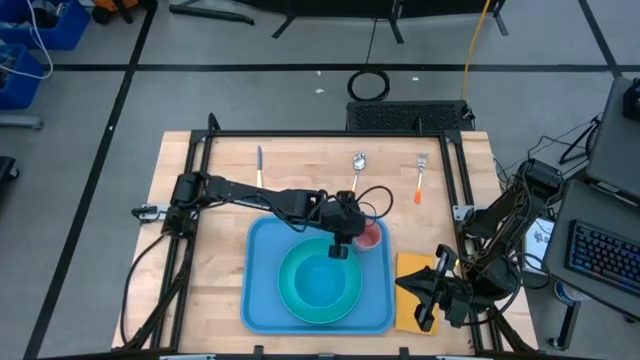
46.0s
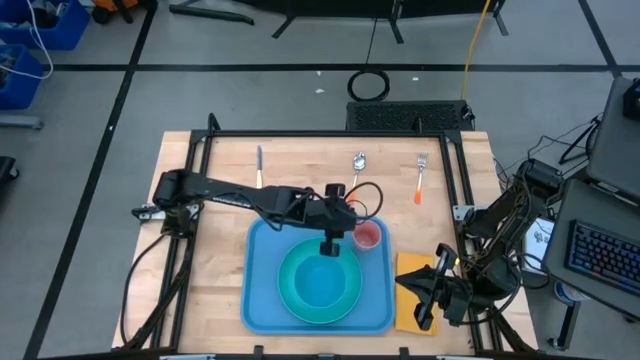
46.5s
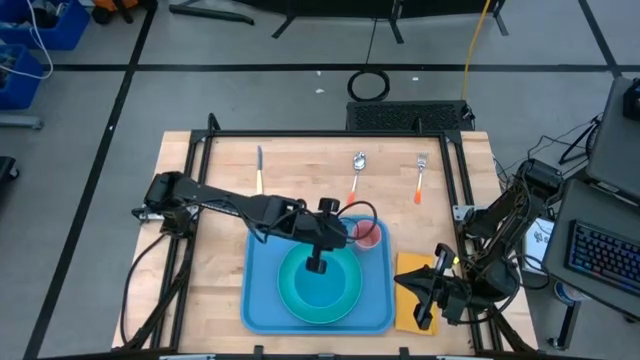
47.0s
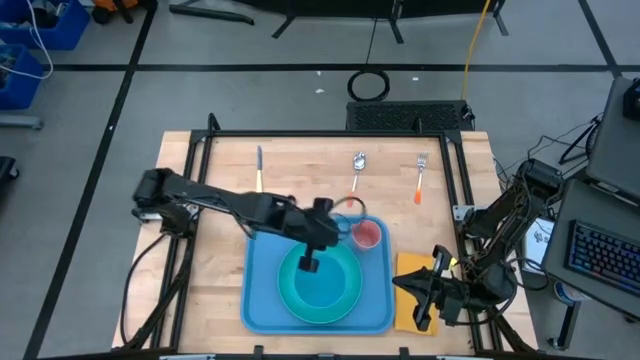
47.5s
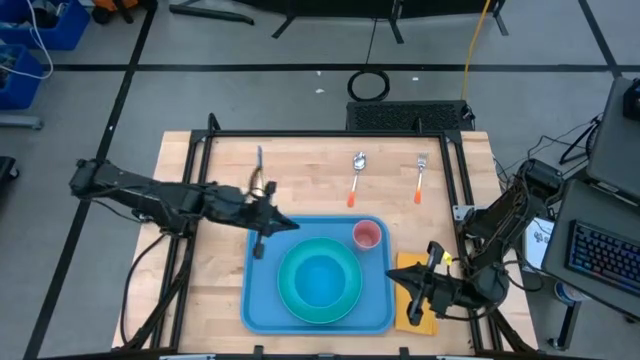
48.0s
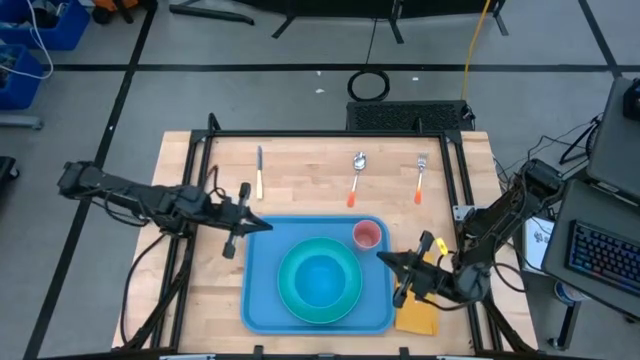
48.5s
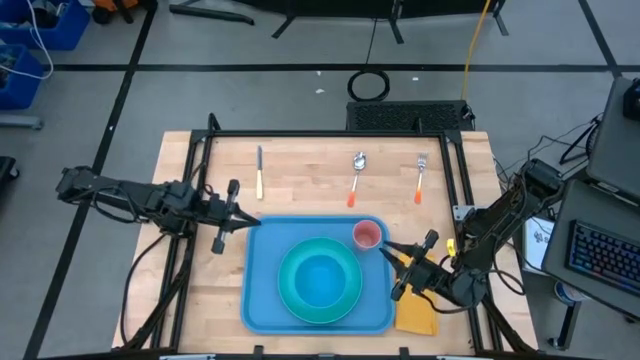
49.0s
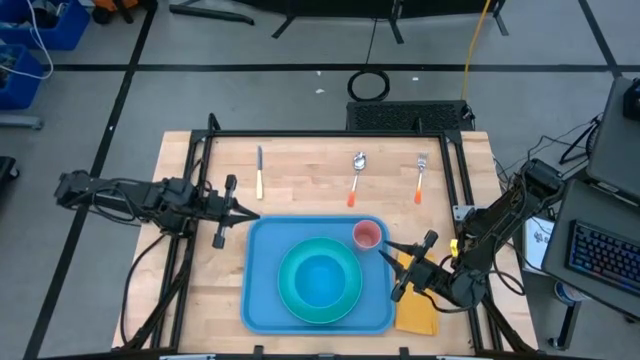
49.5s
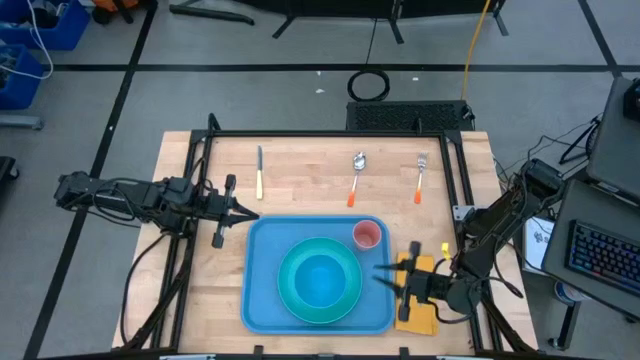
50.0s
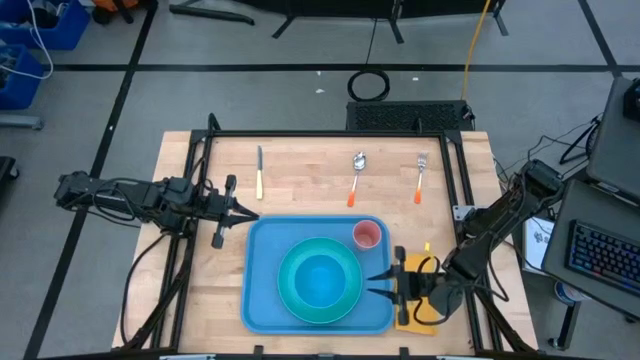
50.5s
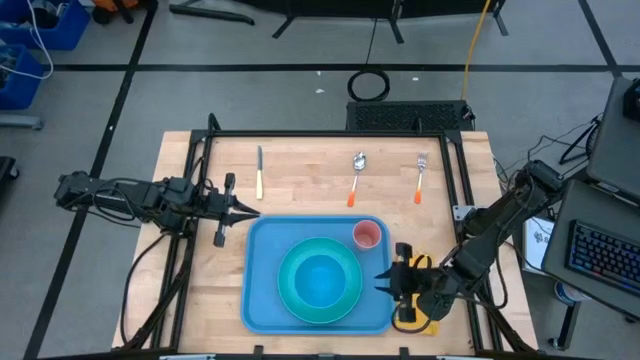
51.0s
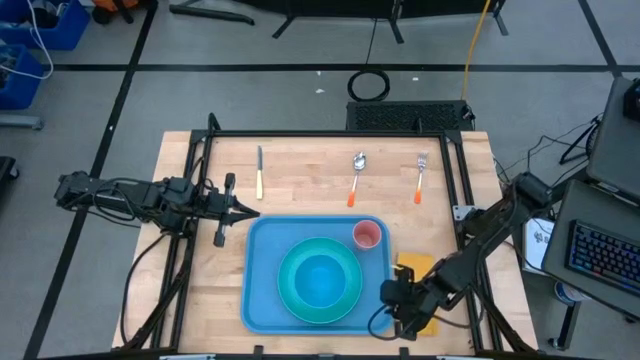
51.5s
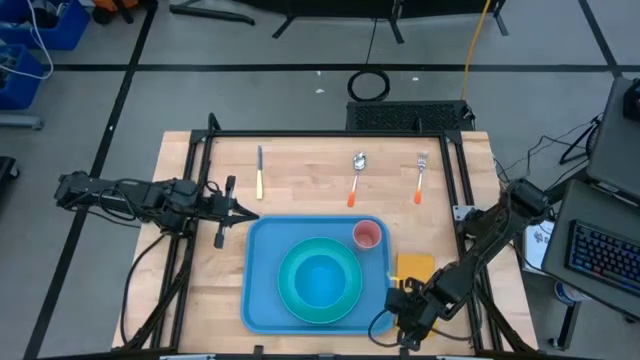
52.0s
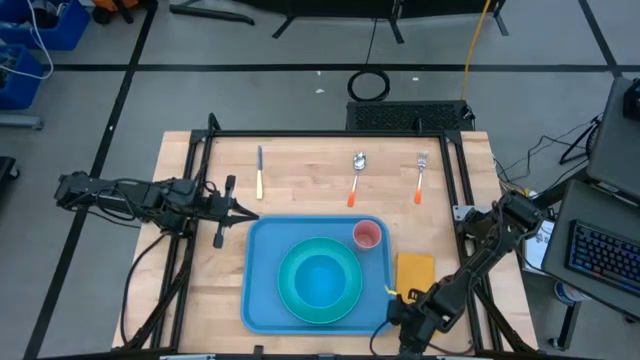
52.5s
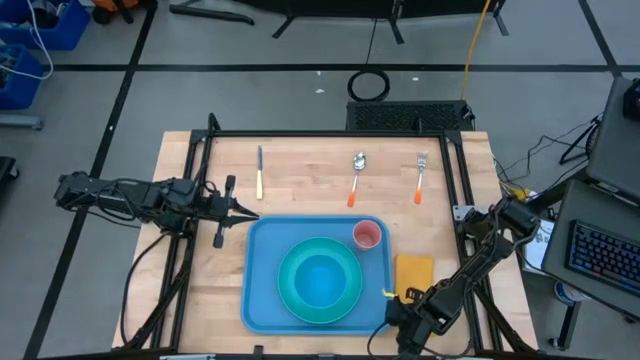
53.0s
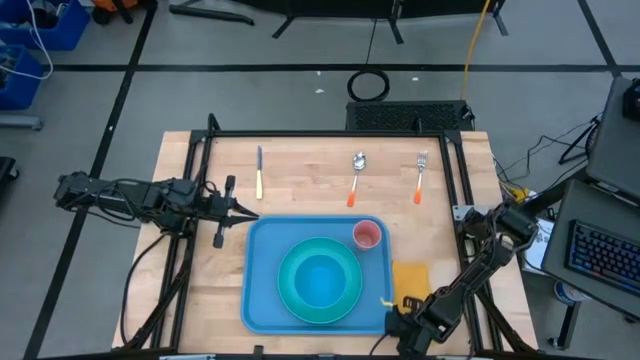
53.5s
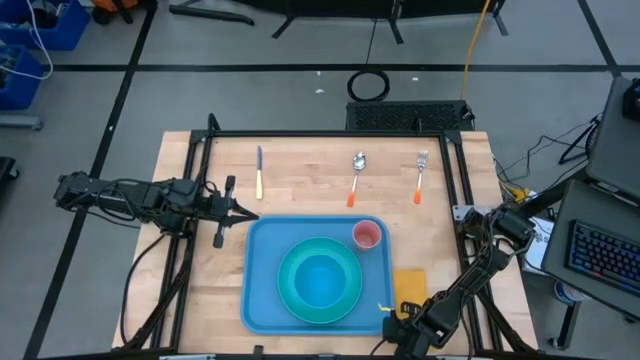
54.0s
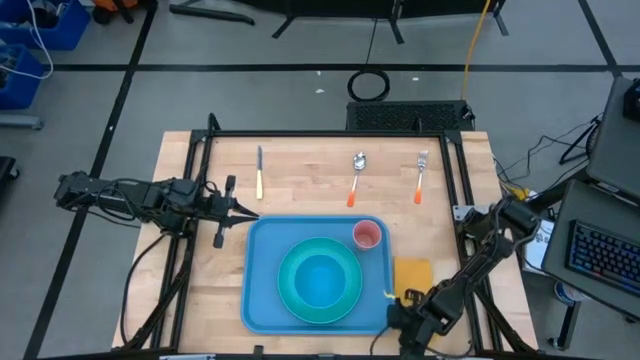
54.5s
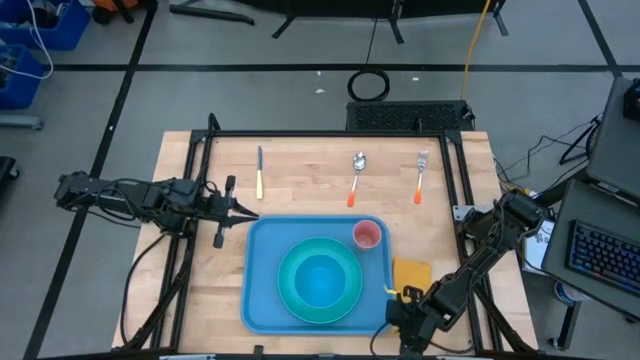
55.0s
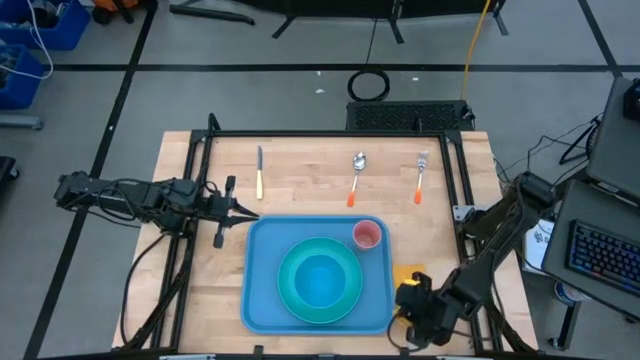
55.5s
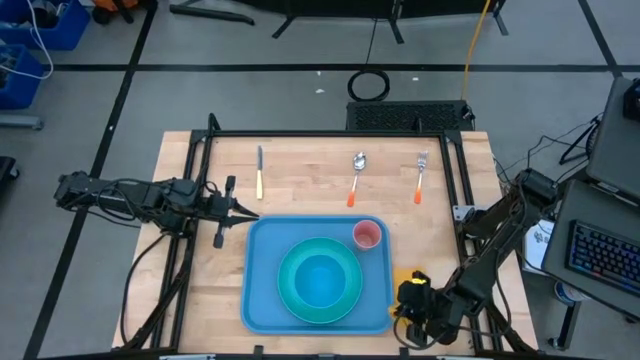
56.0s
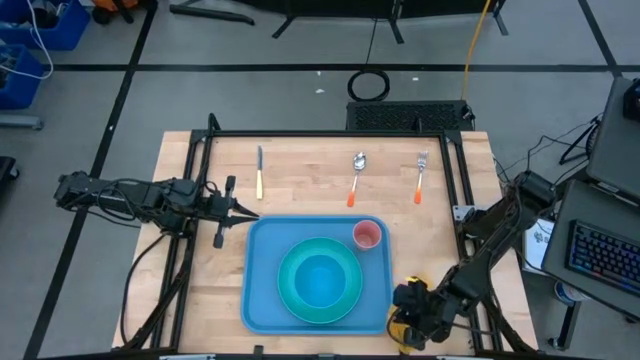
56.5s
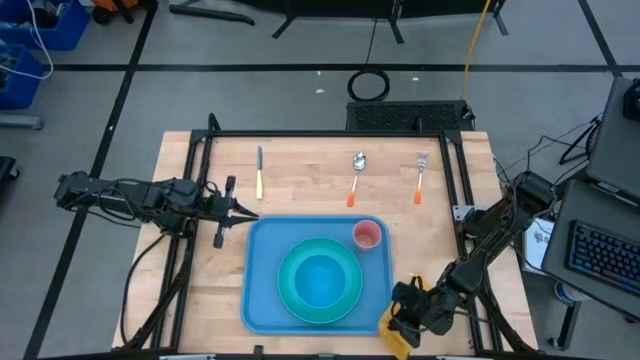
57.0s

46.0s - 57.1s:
Task: Set up tray
Put the yellow napkin on the blue tray at the left of the light blue plate

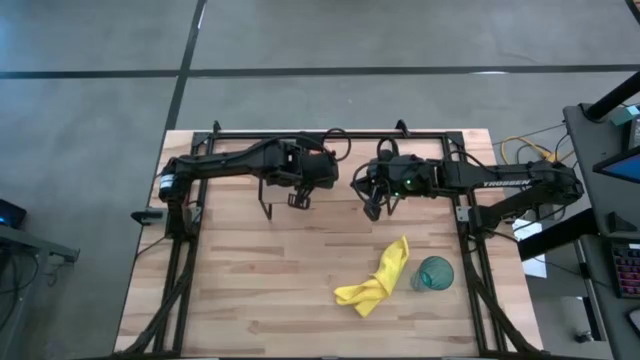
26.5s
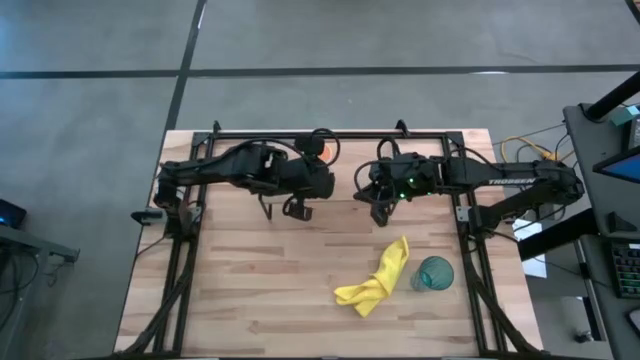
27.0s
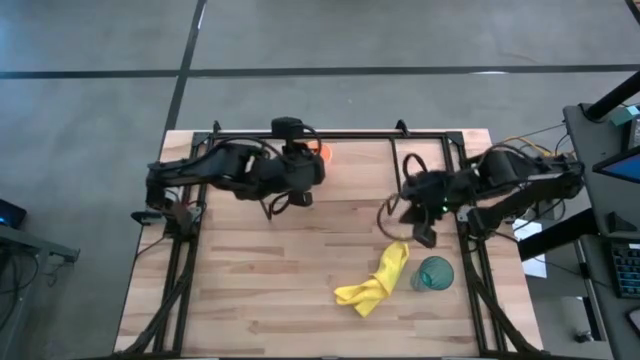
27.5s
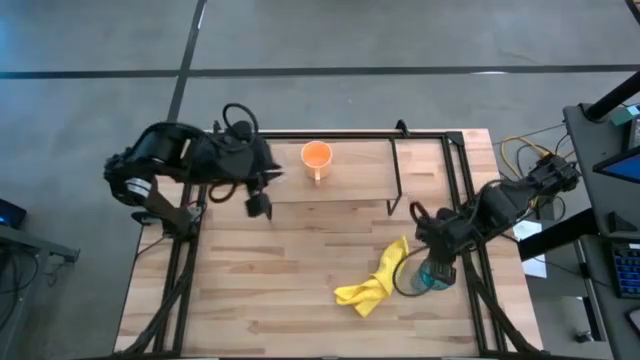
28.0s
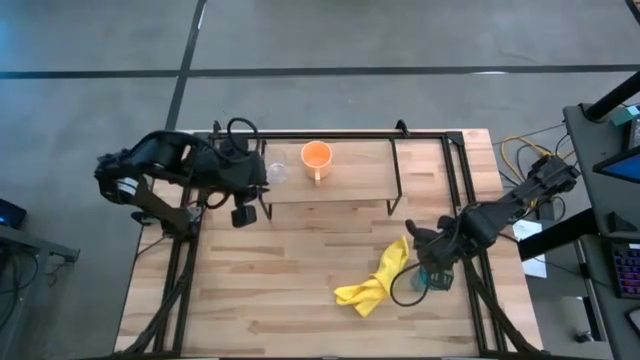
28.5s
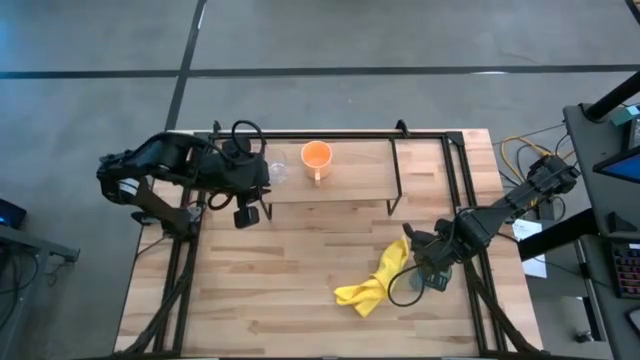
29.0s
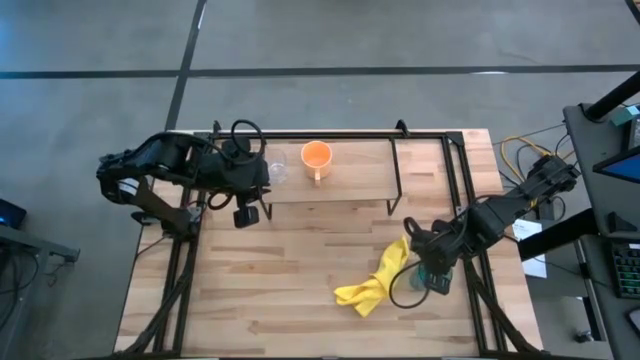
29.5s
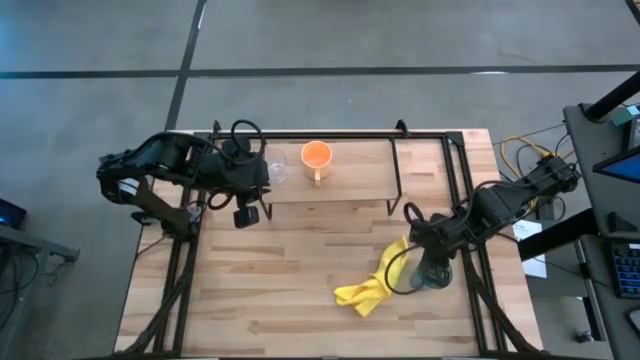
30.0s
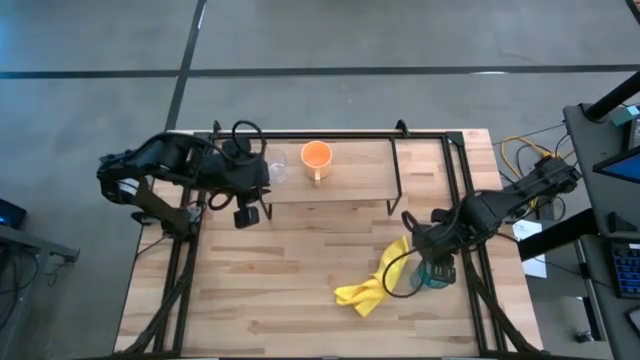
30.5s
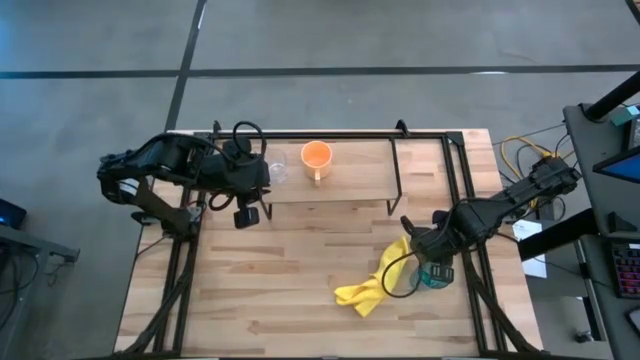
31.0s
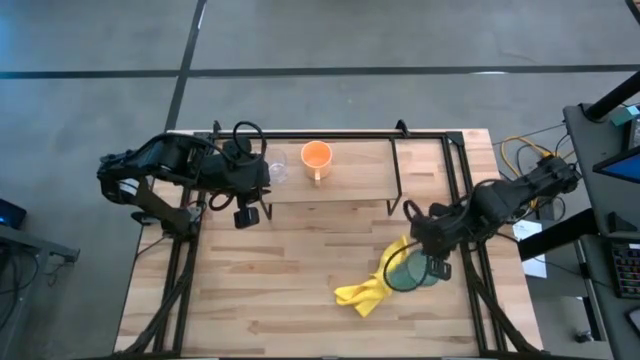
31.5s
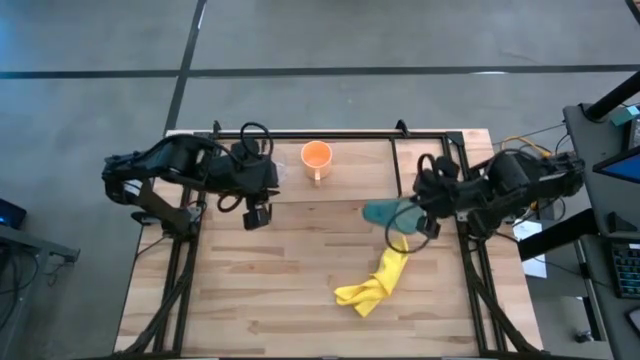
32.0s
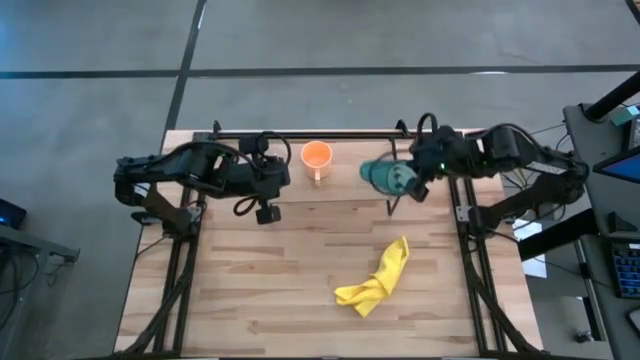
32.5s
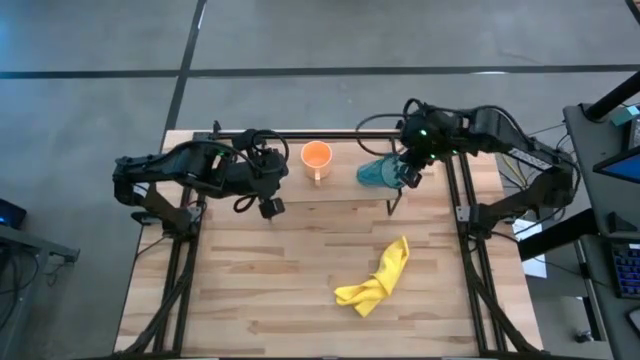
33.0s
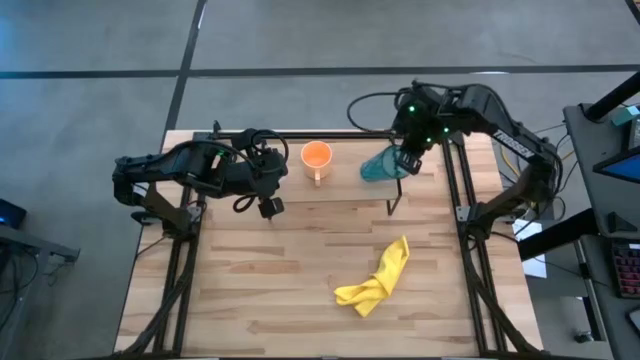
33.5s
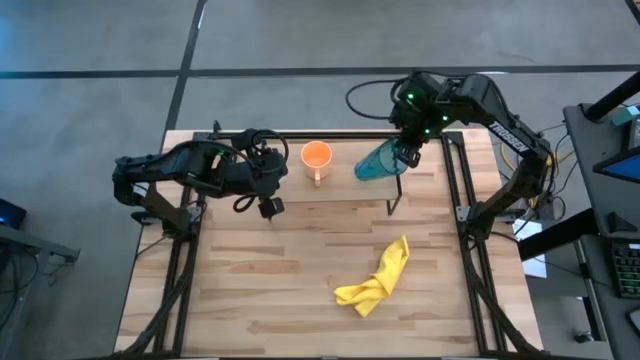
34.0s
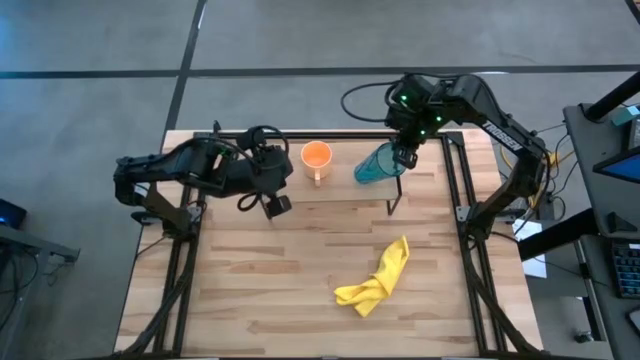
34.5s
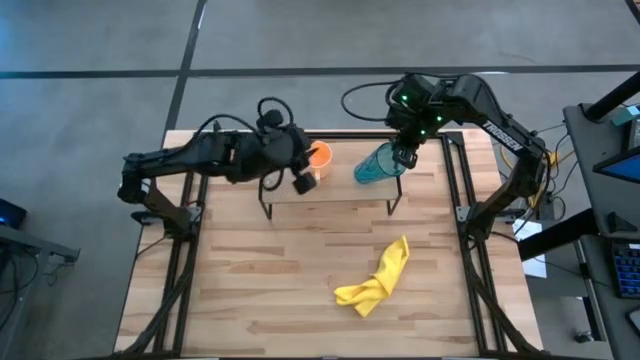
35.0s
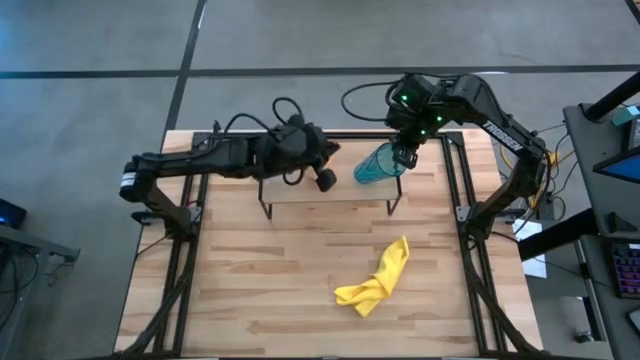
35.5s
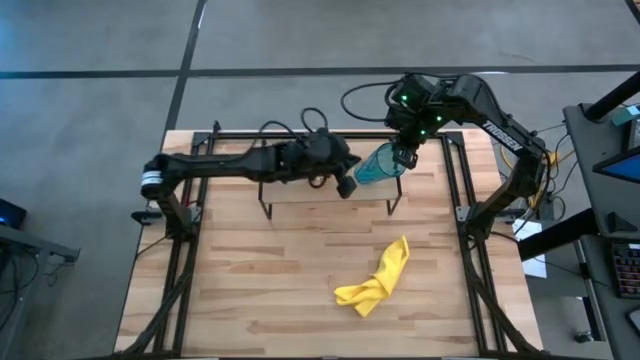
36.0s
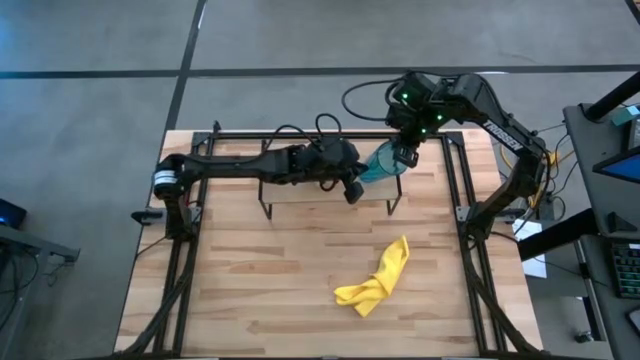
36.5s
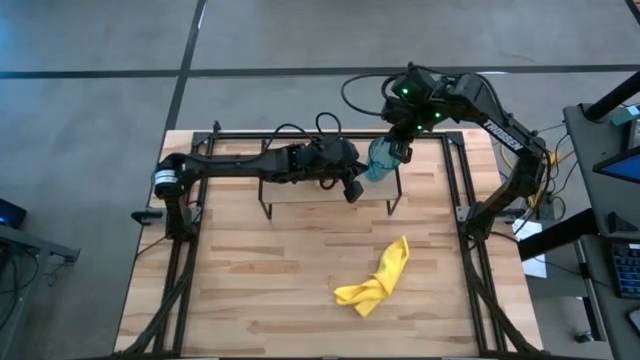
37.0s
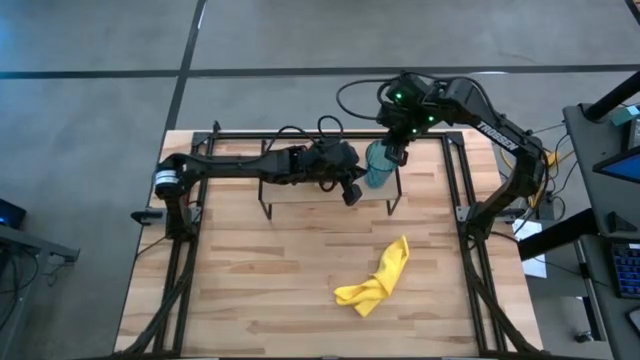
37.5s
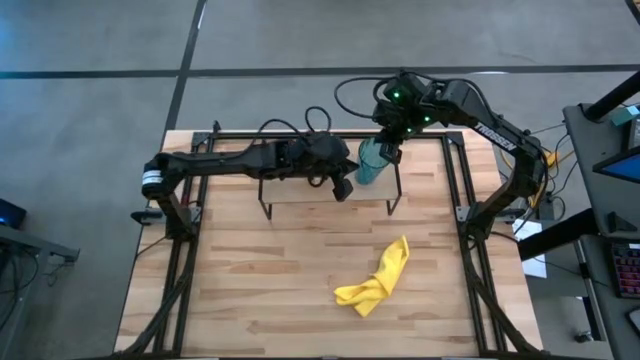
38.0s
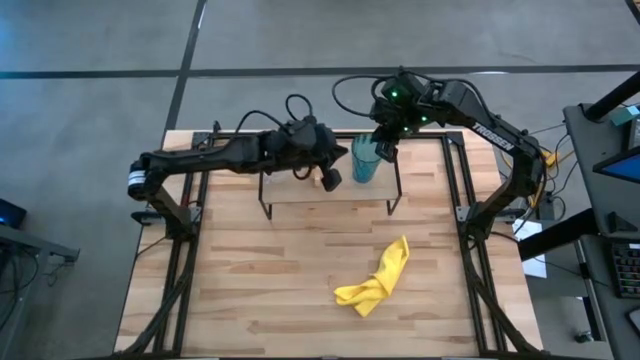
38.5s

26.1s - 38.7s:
Task: Stack small to large cups/mugs on shelf
Put the blue cup on the shelf
